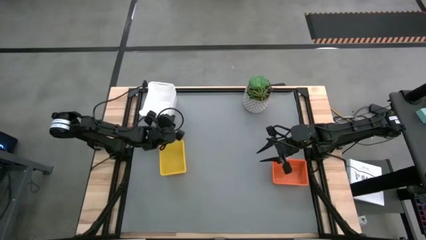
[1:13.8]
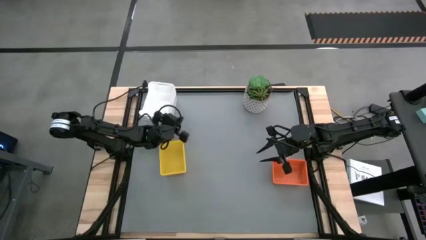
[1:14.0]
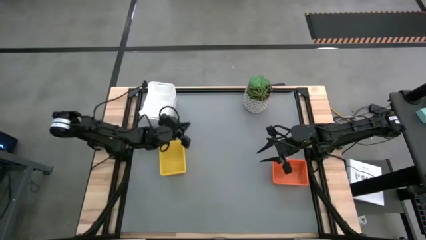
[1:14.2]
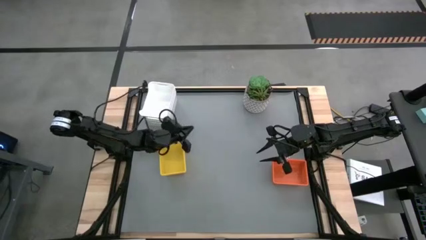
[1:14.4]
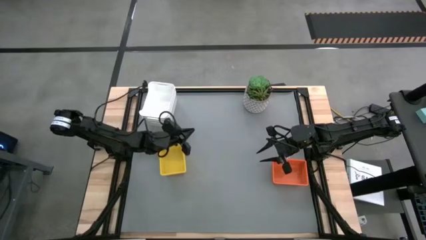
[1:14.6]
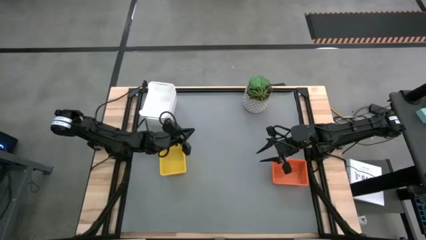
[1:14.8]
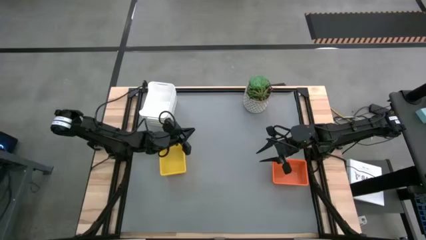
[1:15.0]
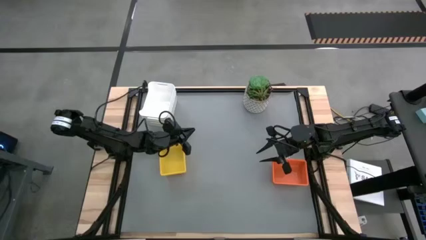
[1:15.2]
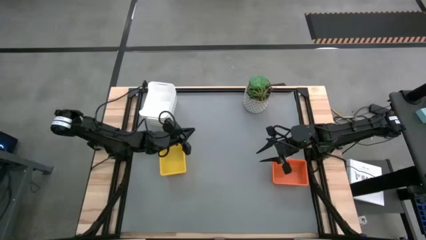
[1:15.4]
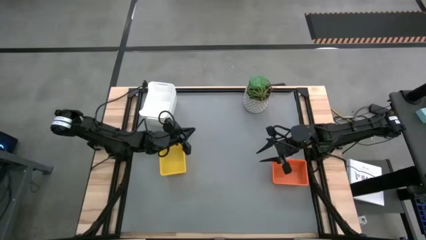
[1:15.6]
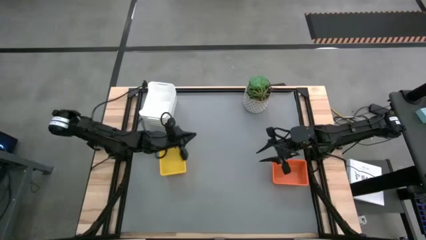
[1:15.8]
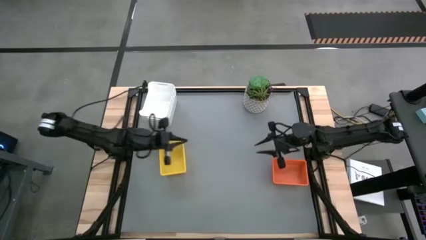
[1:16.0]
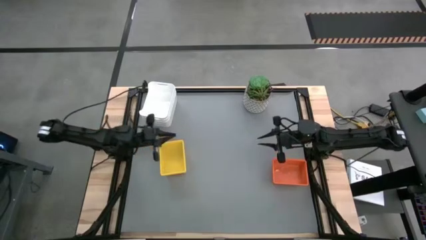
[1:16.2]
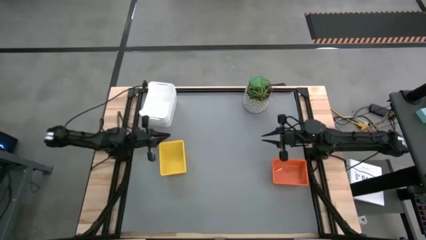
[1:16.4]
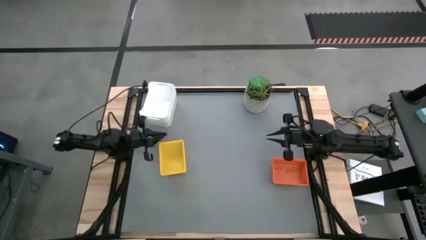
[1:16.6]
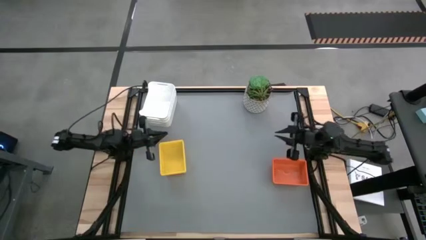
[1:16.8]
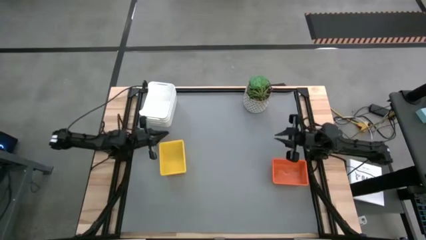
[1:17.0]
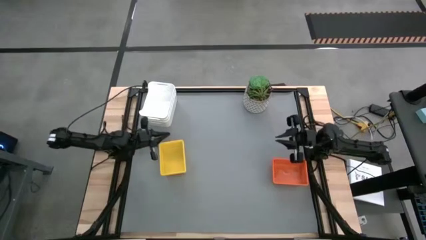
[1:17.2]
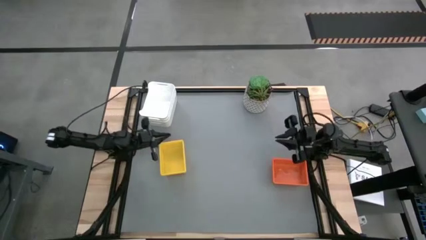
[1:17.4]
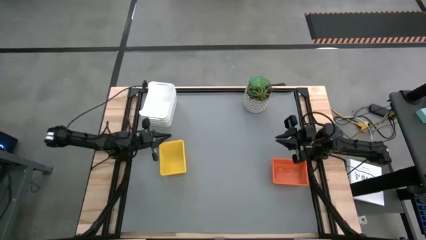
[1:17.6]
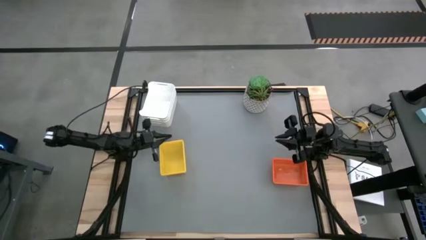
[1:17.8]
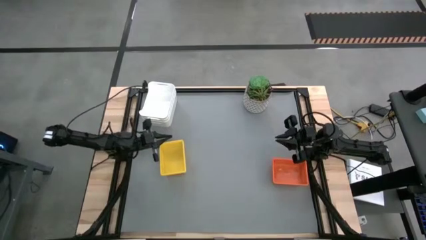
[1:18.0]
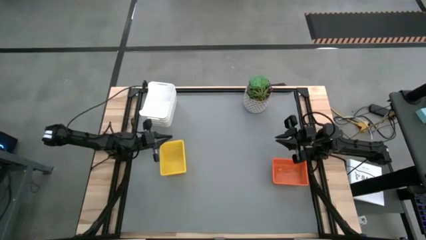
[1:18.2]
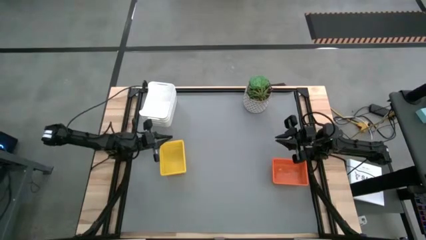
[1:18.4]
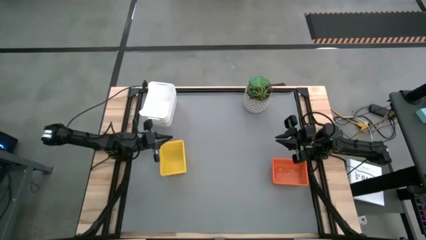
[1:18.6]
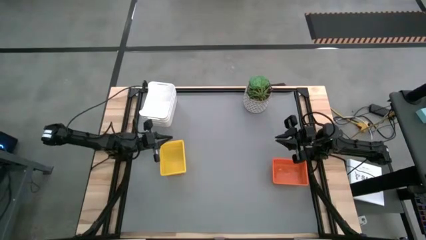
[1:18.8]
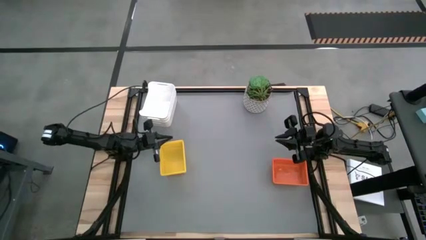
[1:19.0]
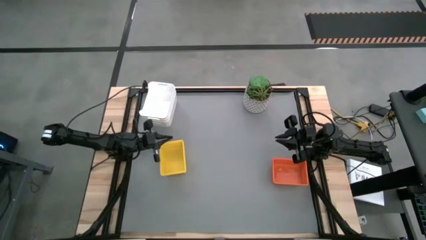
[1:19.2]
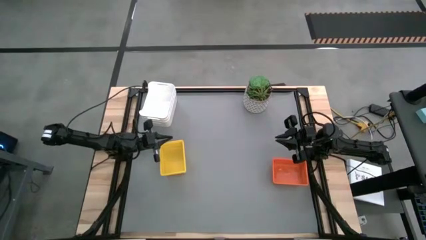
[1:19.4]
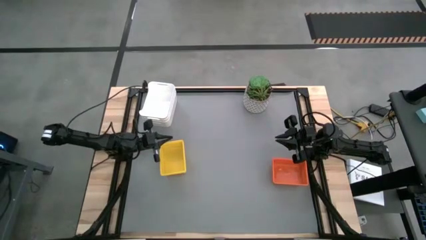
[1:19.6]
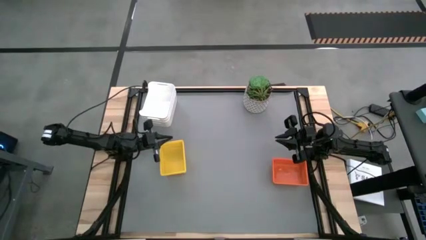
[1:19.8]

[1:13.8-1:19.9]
Return to Home Position
